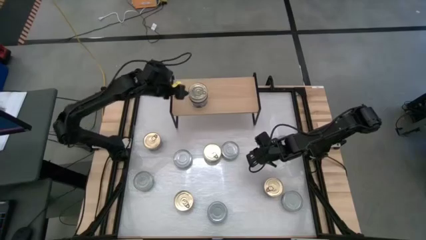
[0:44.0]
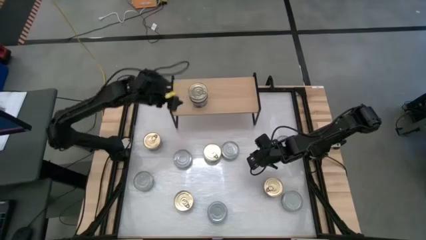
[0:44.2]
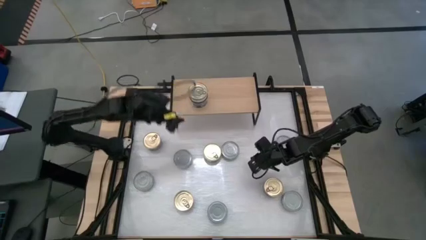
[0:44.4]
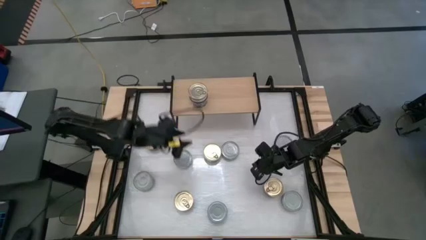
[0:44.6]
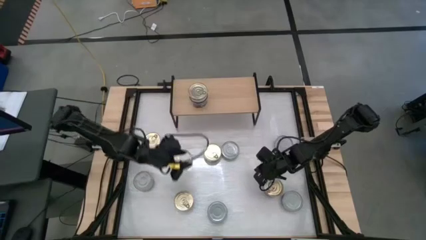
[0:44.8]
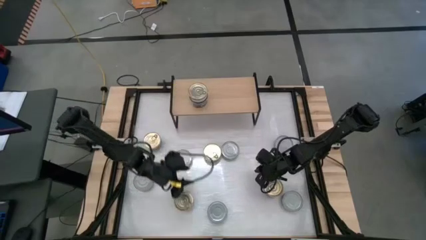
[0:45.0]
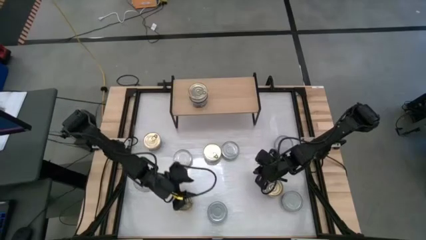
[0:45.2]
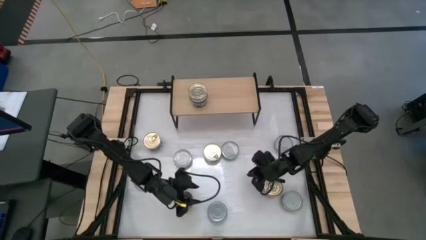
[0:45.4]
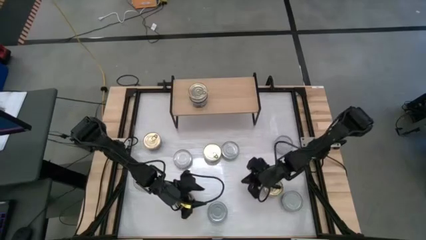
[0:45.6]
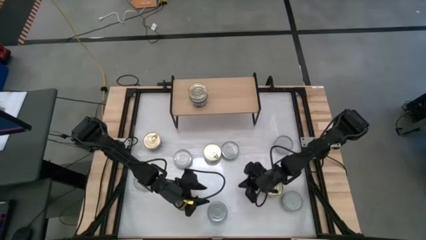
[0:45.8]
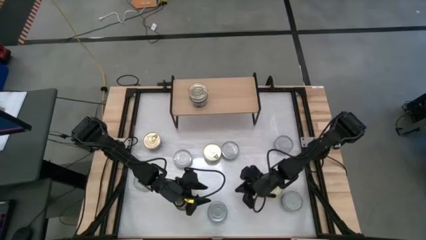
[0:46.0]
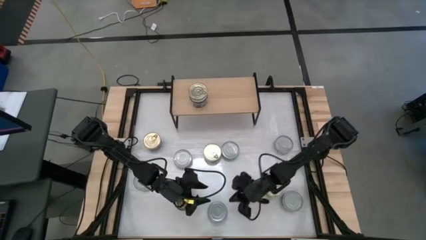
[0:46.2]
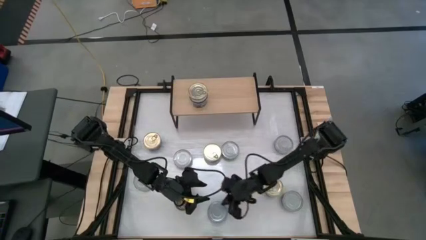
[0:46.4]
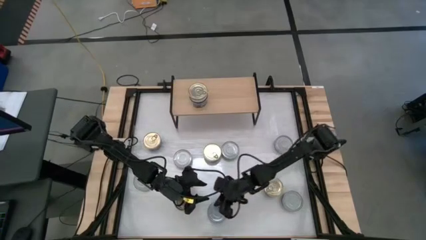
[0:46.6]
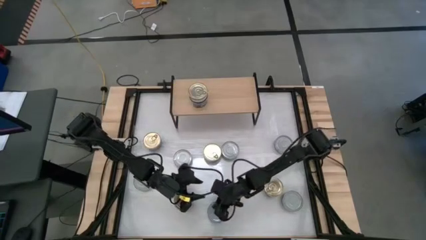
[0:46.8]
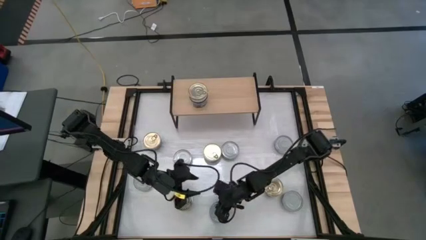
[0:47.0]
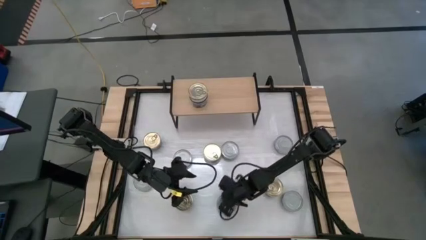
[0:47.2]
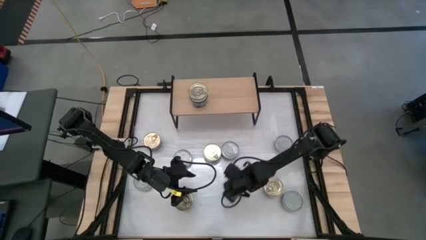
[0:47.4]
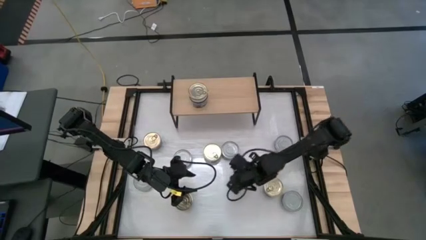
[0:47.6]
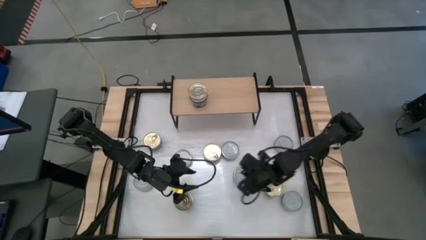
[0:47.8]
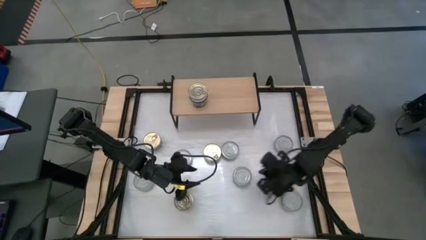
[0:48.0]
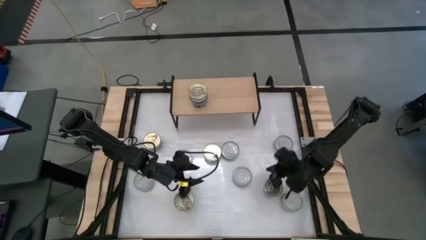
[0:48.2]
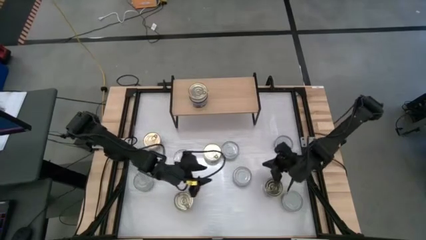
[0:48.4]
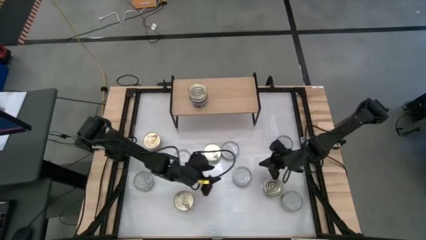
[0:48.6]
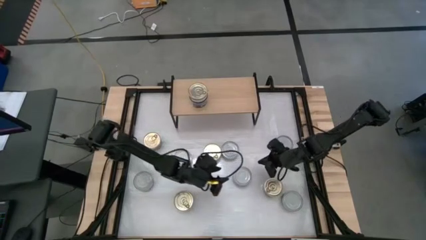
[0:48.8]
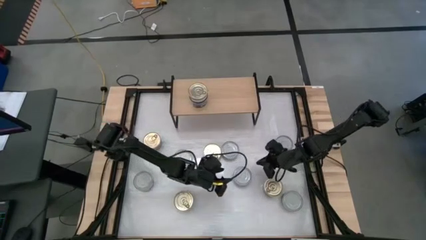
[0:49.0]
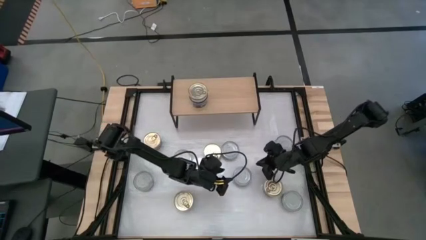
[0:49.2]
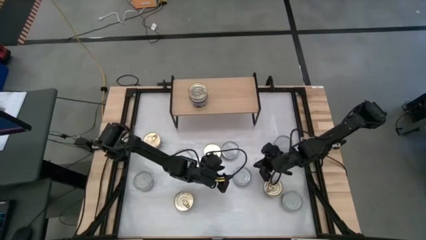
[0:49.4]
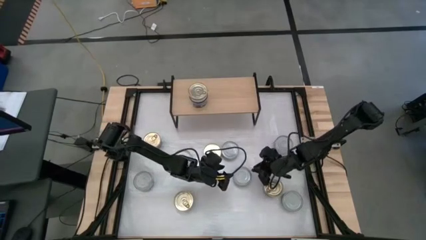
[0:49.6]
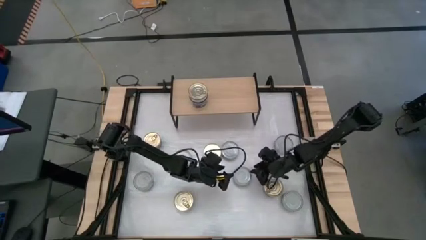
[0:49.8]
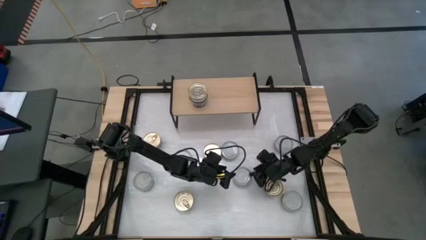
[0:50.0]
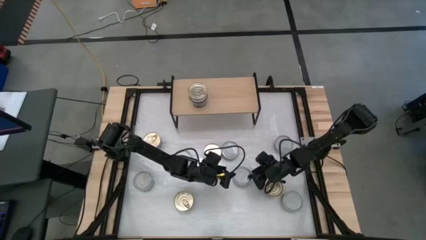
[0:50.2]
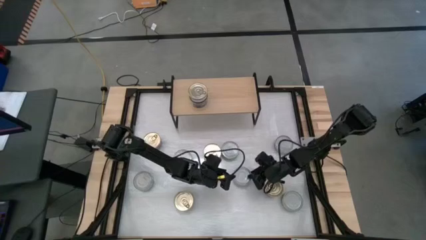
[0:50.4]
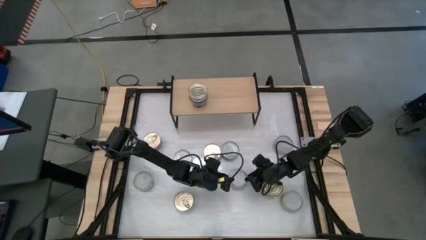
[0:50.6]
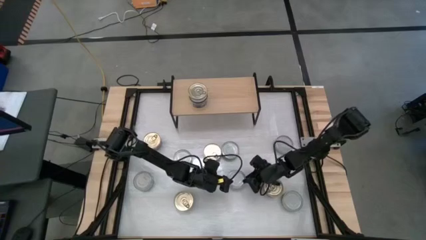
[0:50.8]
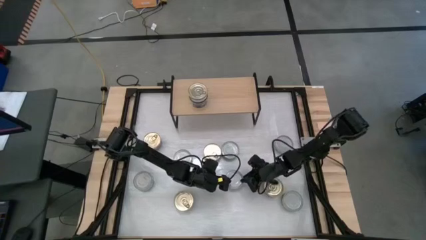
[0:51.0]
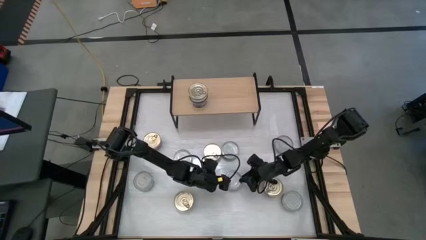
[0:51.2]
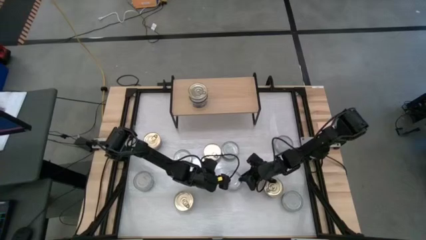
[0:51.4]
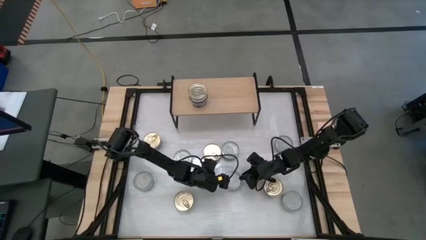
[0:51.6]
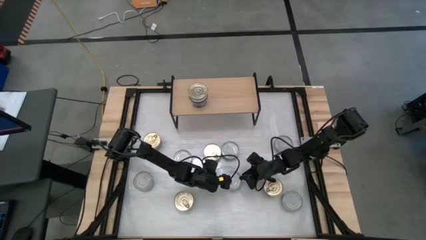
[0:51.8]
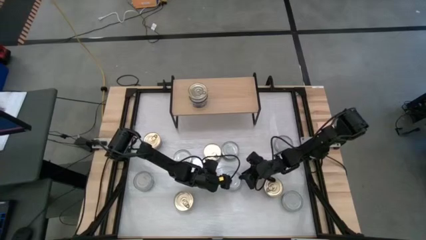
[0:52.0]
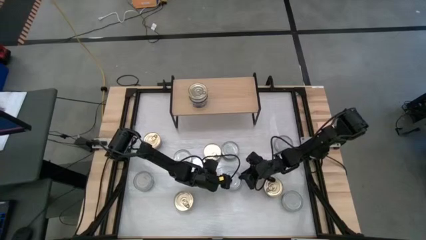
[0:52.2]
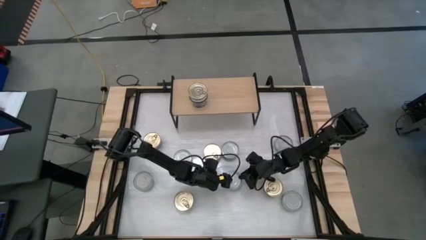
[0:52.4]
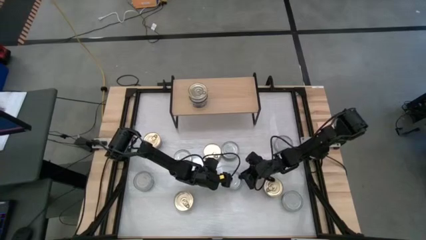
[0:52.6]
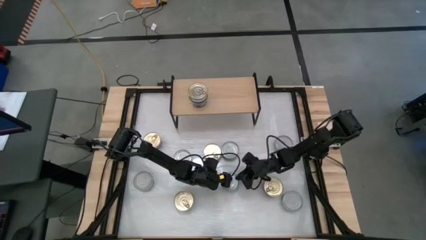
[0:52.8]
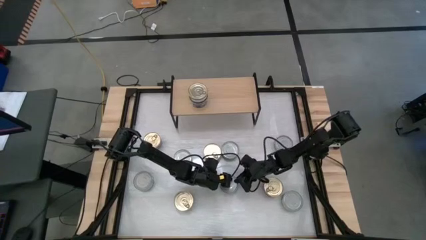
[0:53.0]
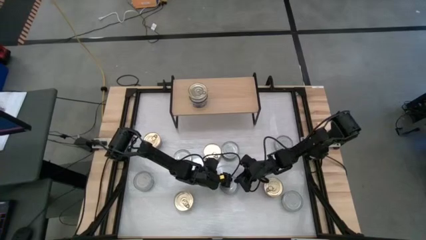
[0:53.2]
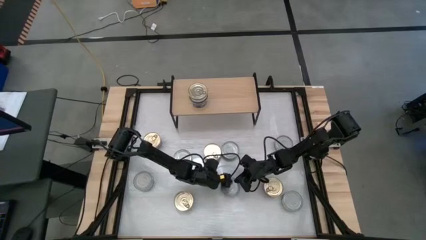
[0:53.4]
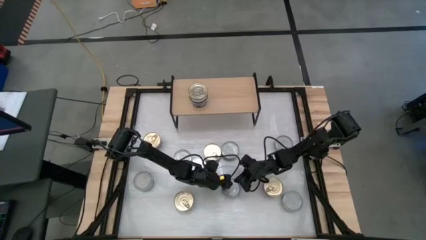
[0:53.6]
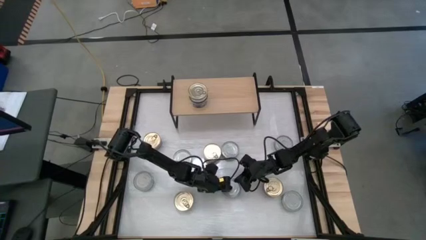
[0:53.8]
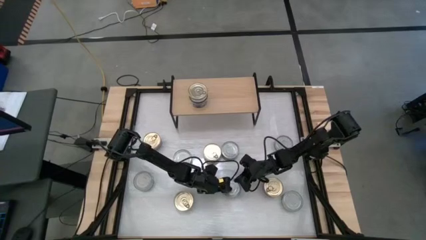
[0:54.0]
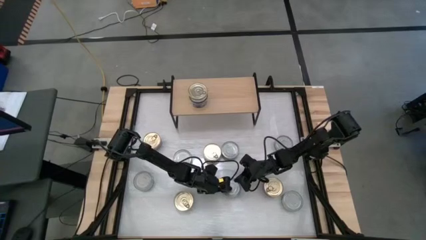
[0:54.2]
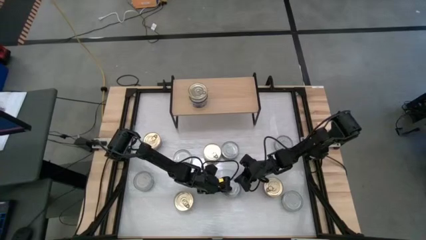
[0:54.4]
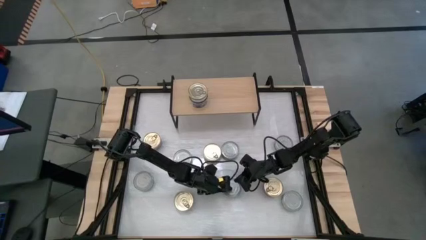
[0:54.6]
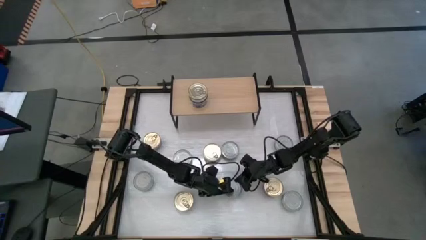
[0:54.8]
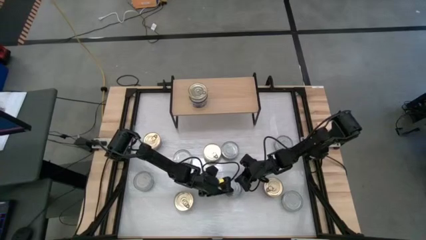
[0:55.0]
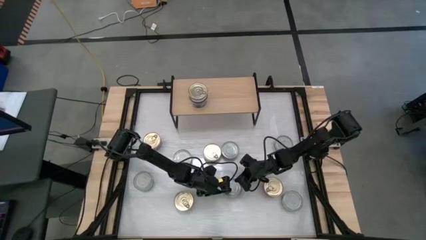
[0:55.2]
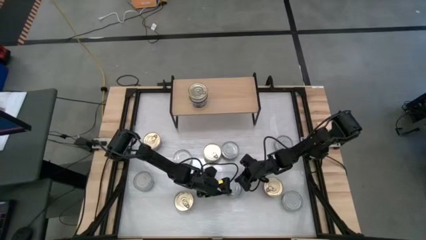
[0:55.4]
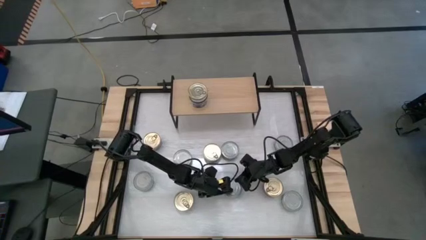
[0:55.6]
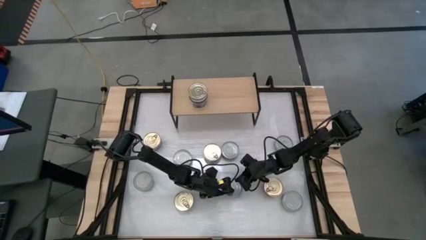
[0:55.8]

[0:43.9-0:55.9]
Task: Stack canned seafood by type on shelf
Put the green white tuna can on the shelf
